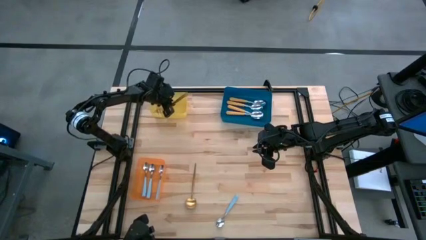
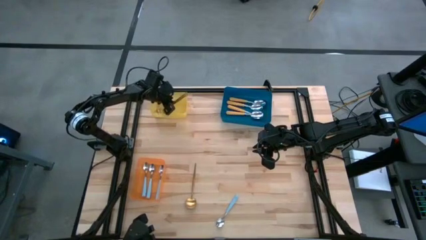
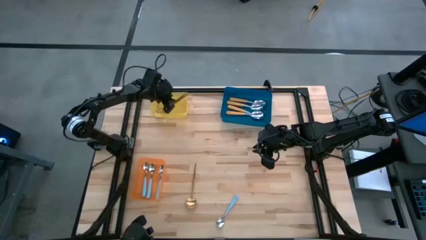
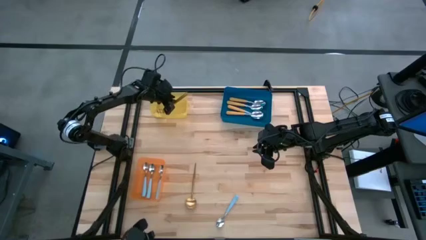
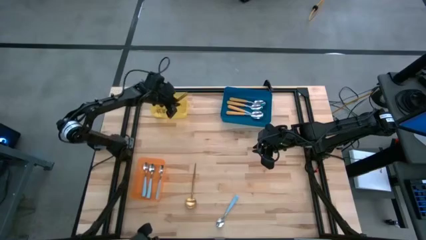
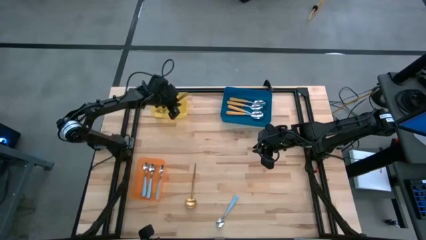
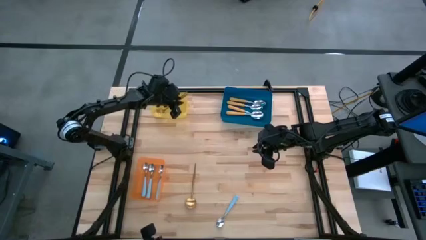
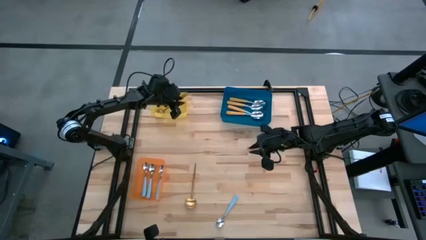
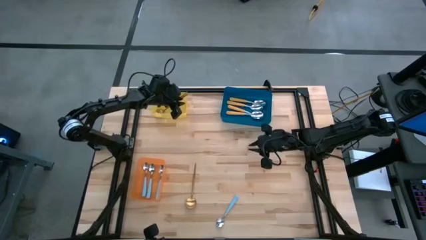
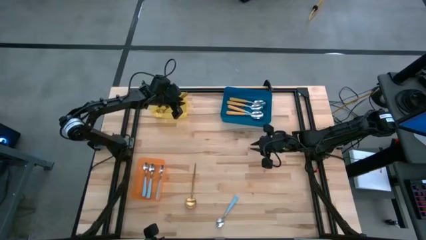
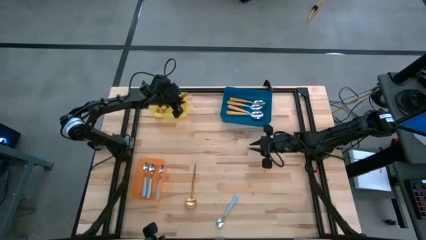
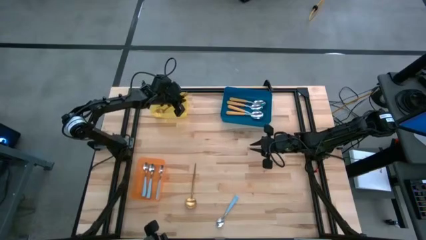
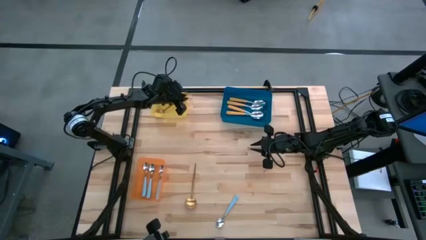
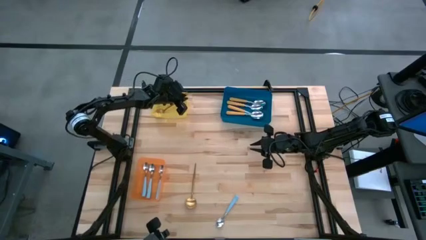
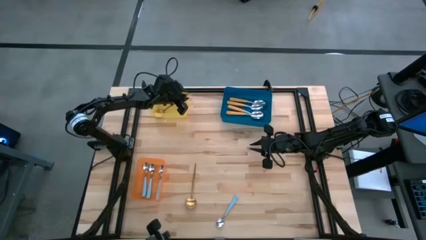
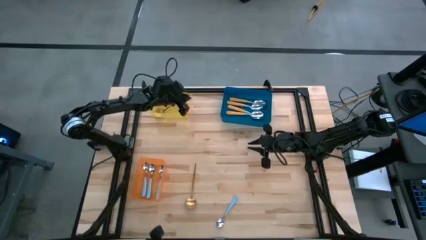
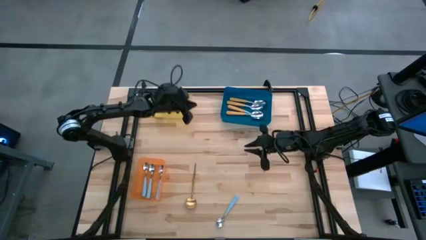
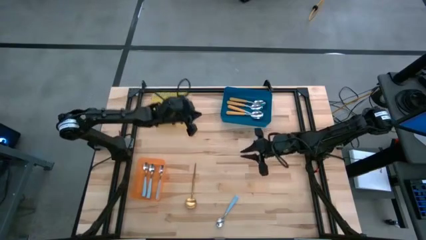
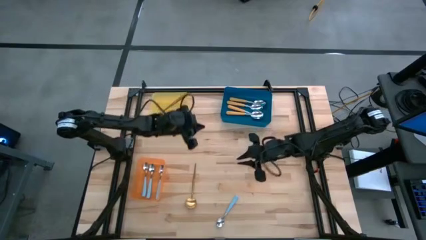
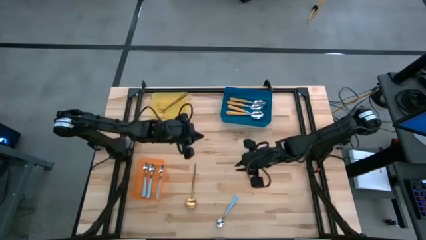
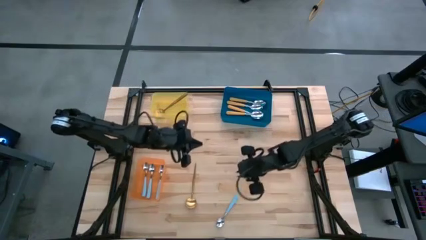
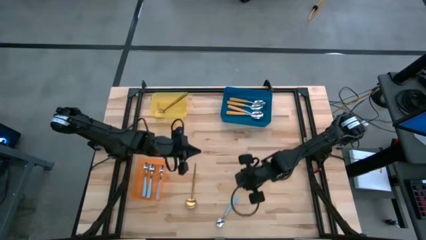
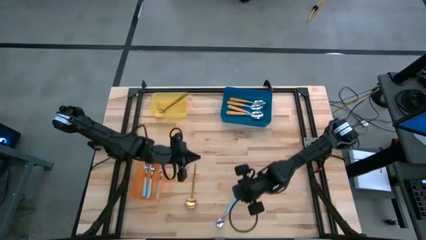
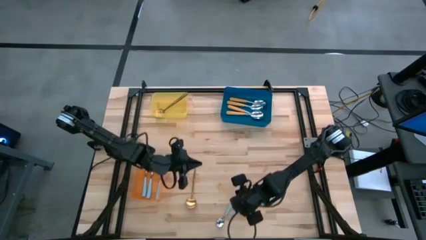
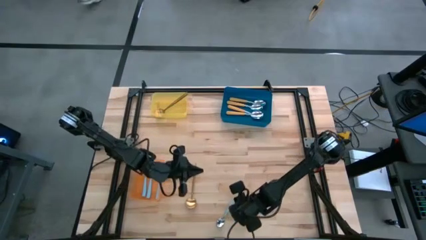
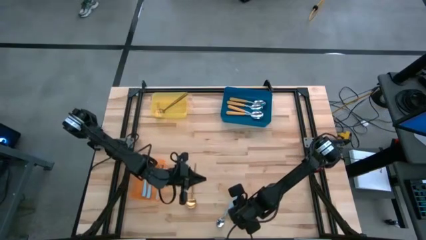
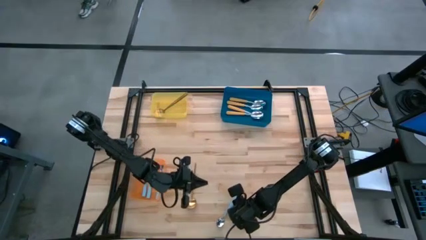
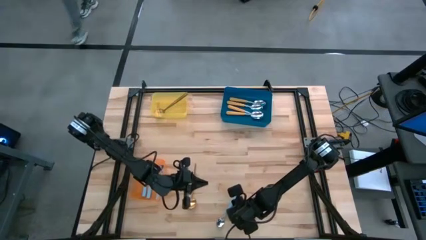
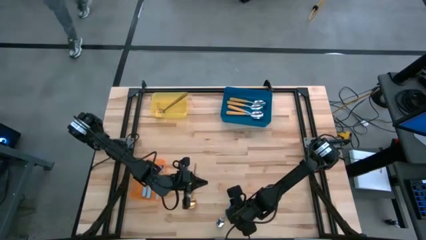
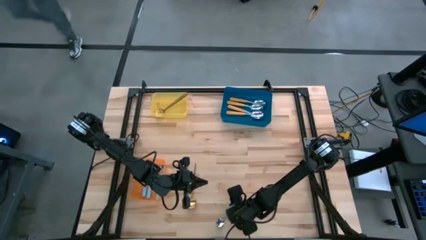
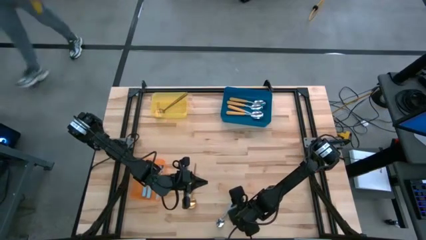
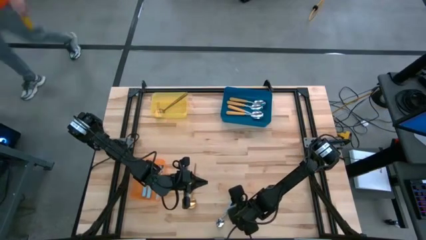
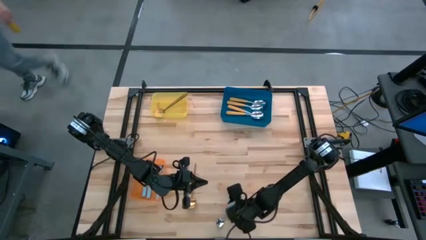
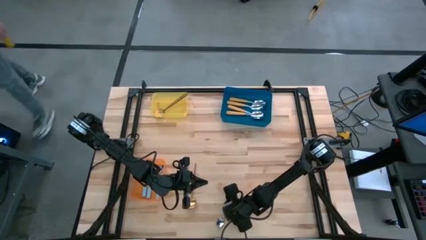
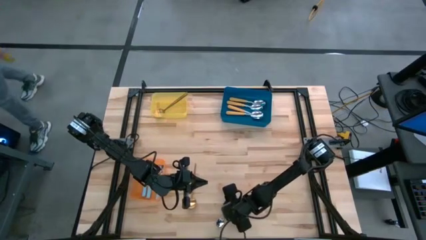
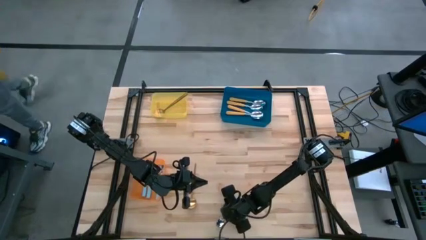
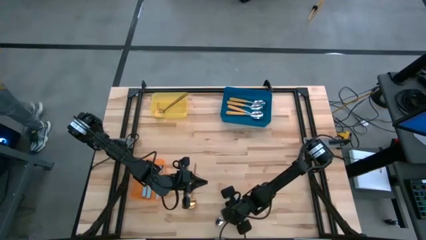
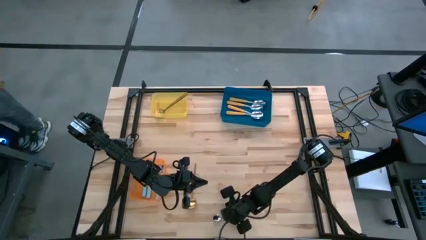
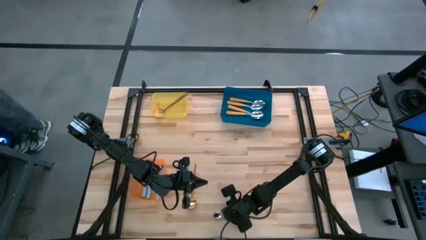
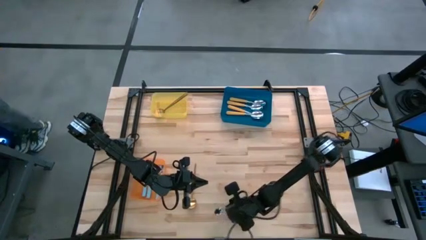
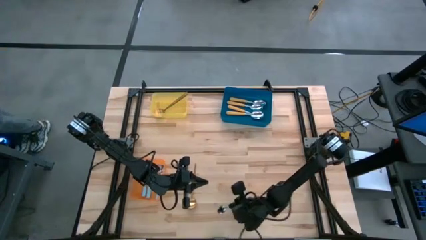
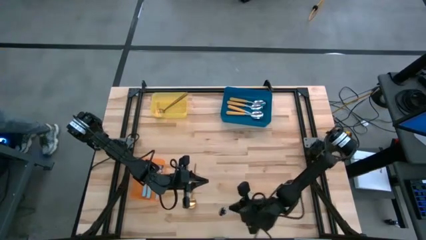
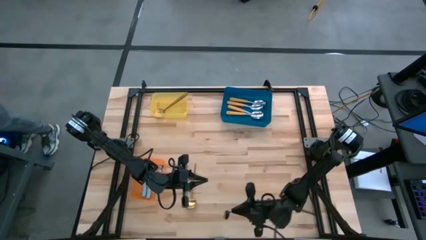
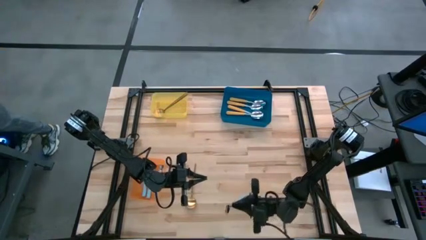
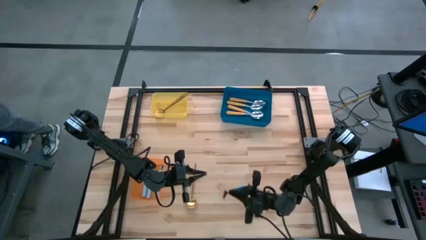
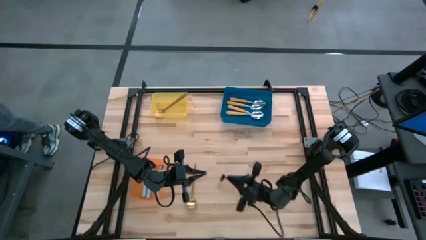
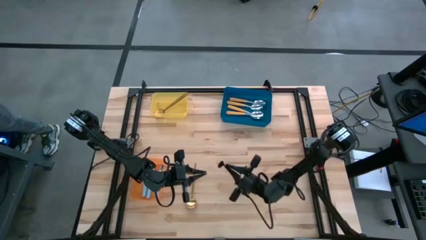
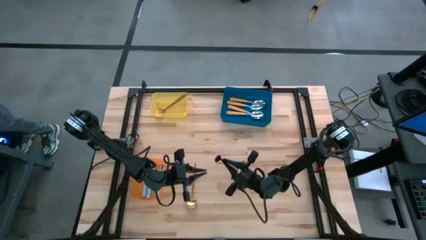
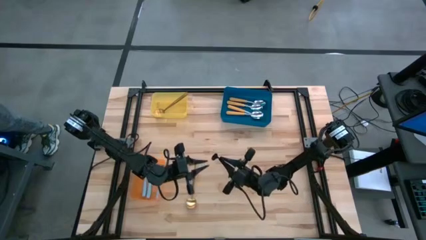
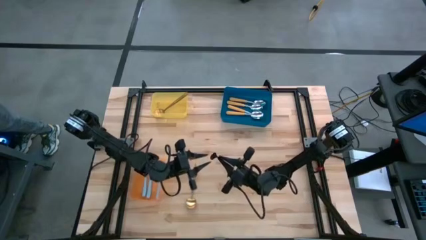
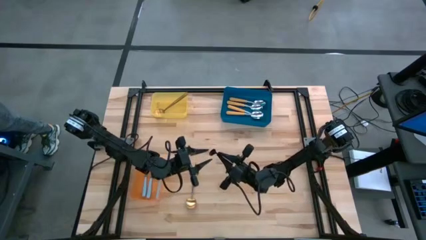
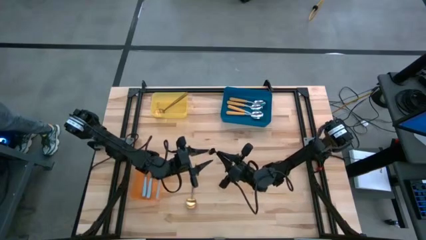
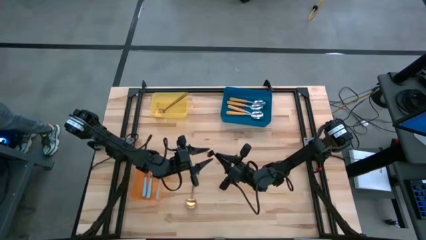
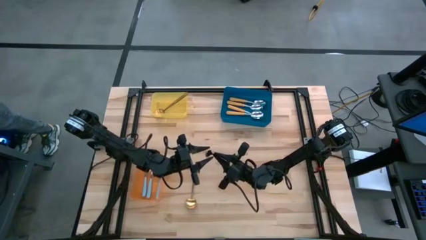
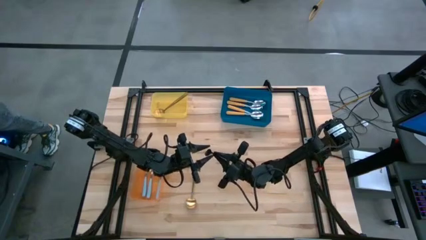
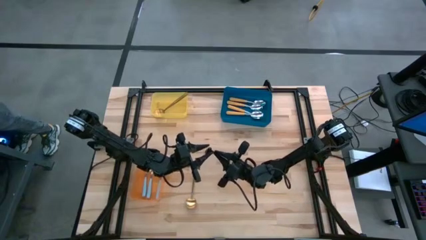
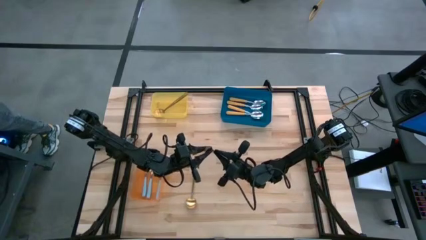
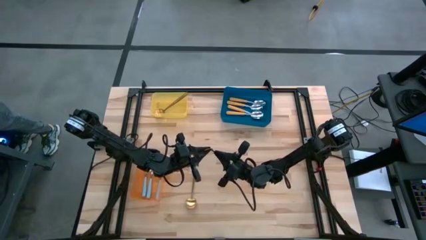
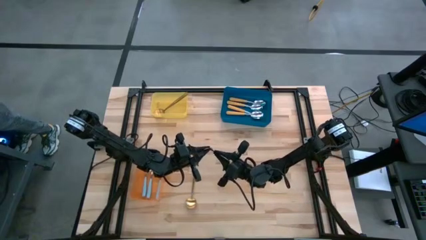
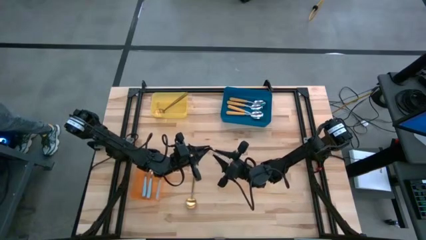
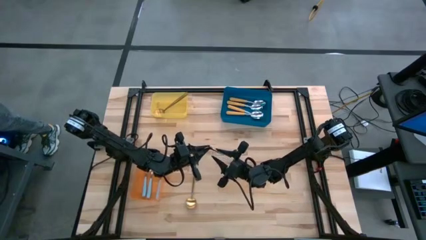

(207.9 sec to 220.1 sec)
Task: Sort silverware by color (type)
Put the blue spoon into the orange bin

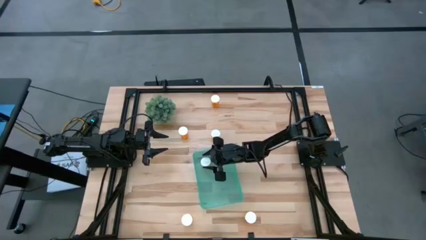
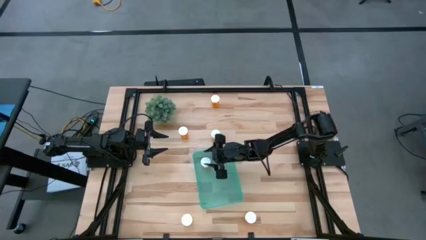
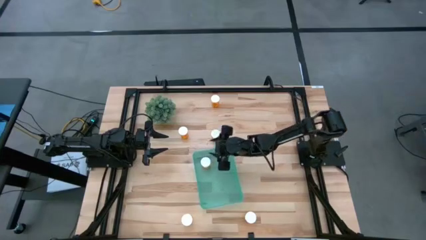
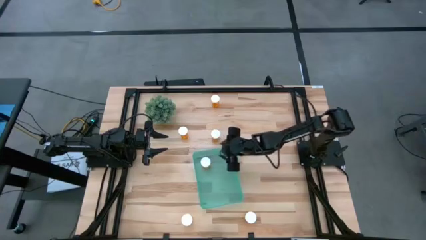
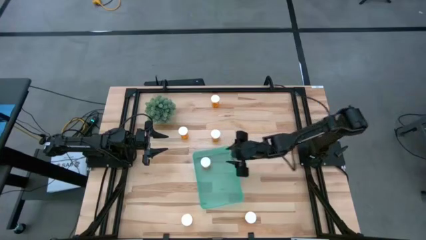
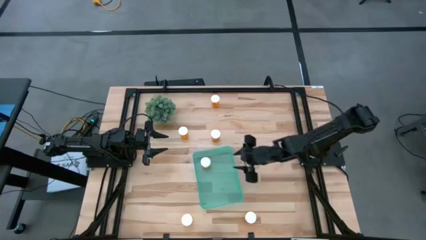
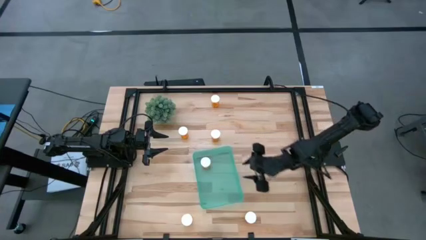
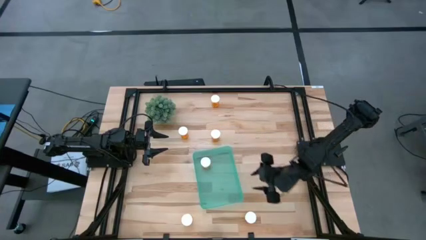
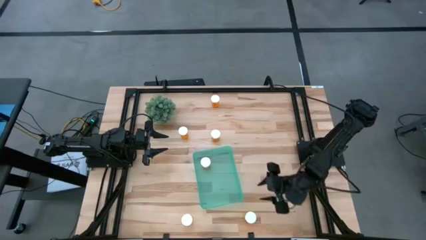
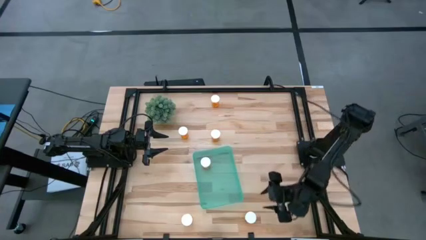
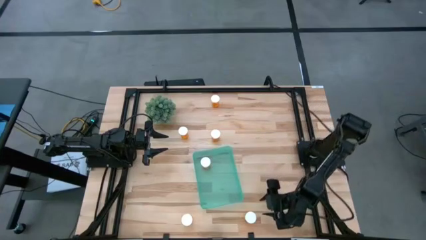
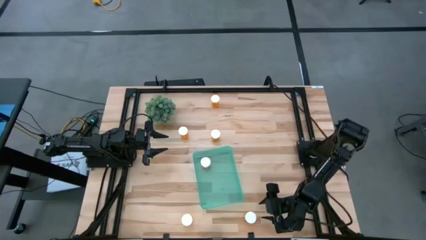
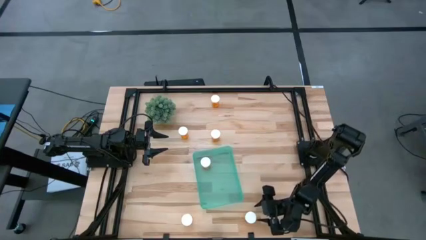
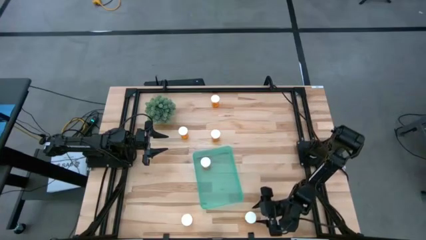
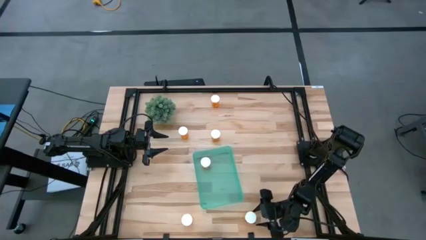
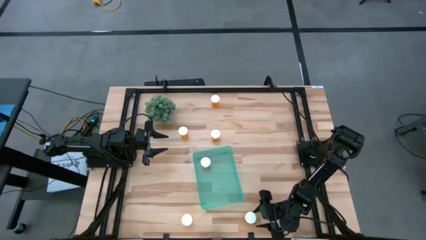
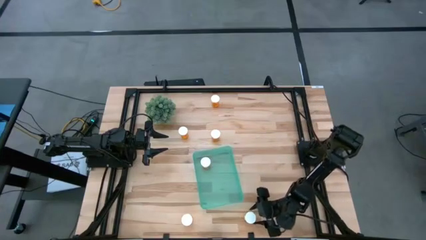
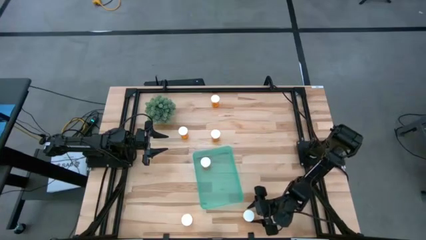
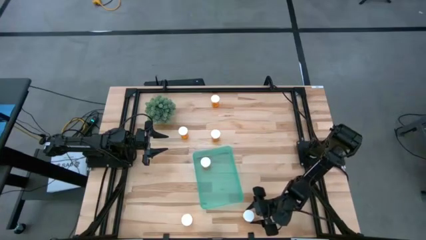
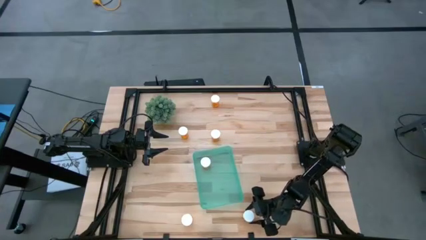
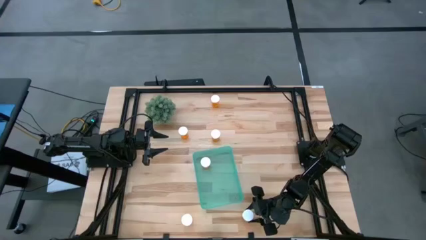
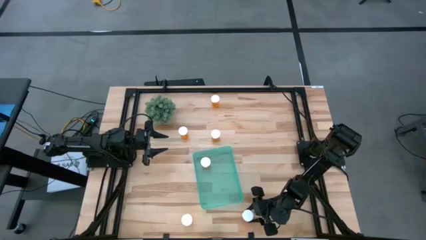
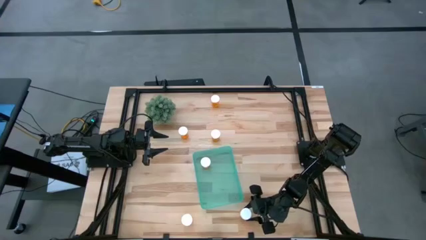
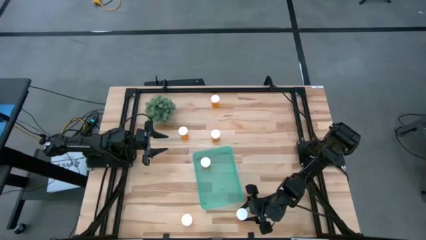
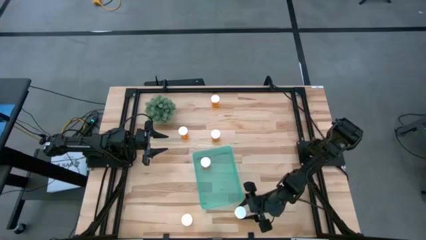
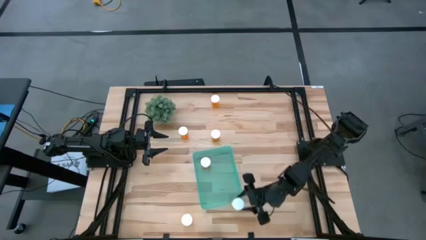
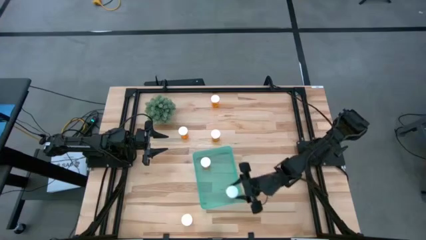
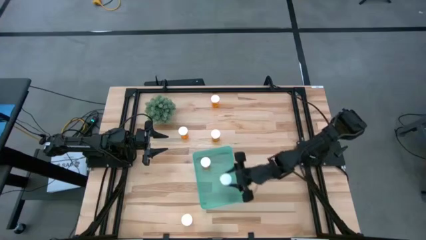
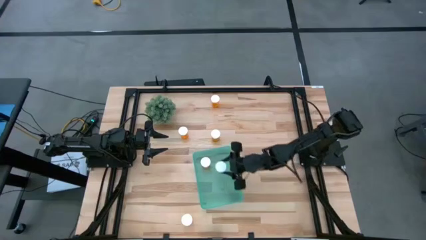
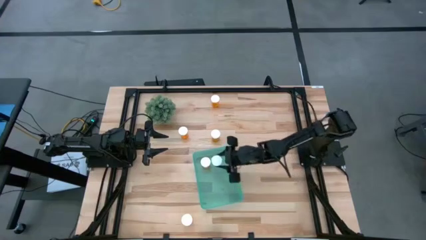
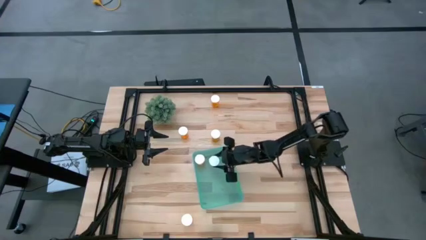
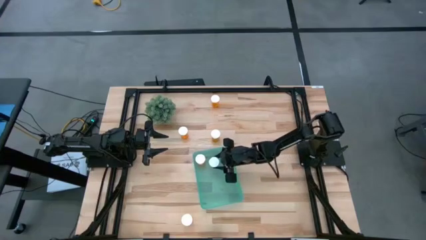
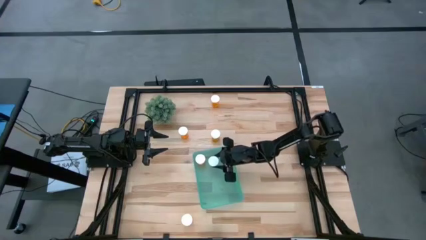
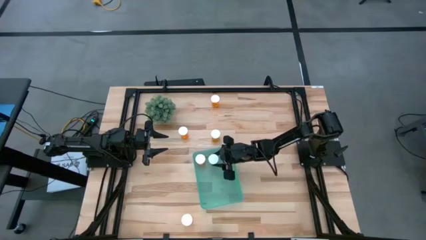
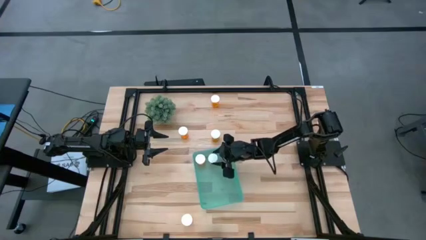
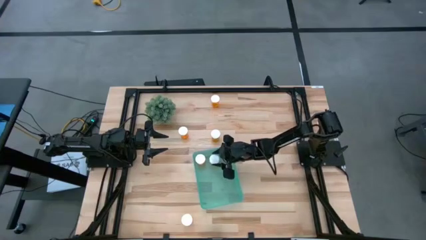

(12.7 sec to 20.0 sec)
Task: Pick and place pill bottles into a basket
Put the orange pill bottle into the green bin
